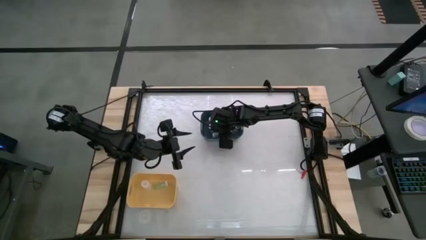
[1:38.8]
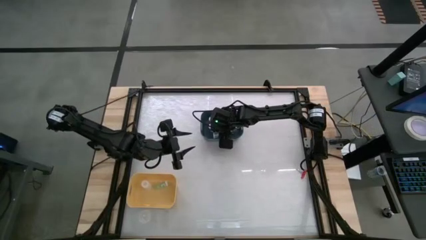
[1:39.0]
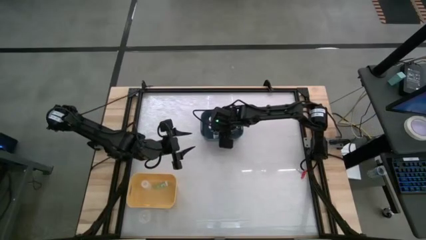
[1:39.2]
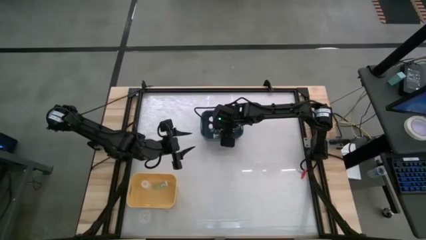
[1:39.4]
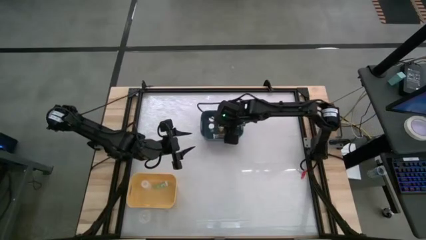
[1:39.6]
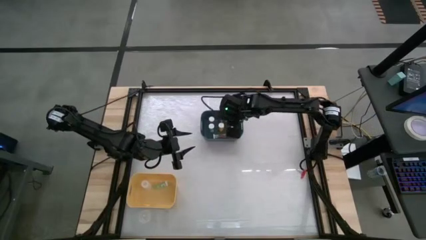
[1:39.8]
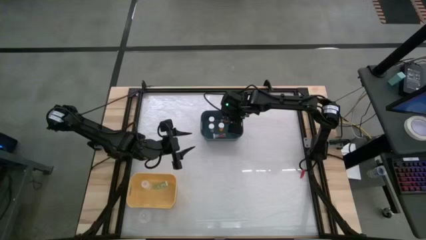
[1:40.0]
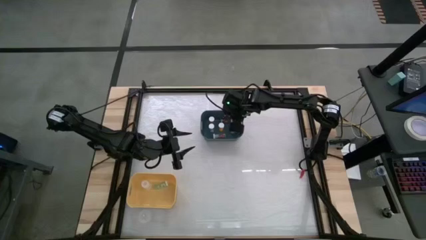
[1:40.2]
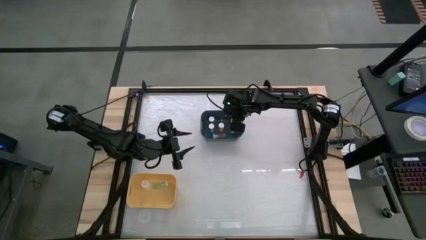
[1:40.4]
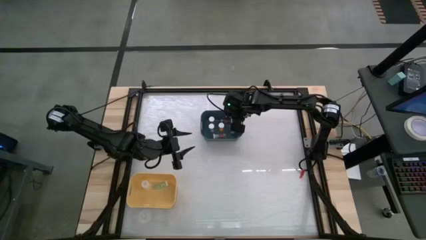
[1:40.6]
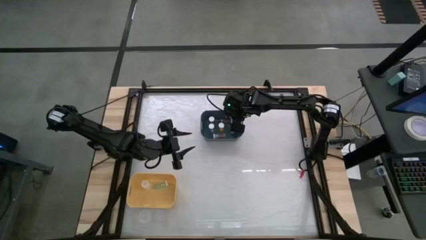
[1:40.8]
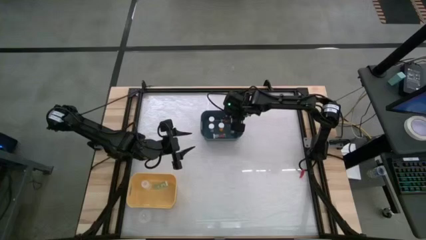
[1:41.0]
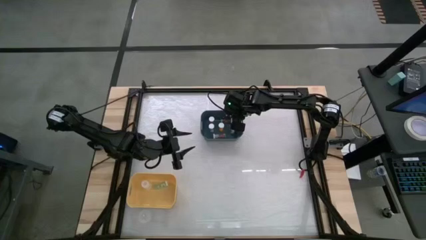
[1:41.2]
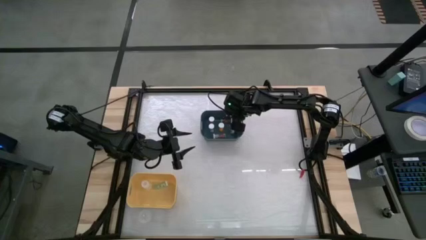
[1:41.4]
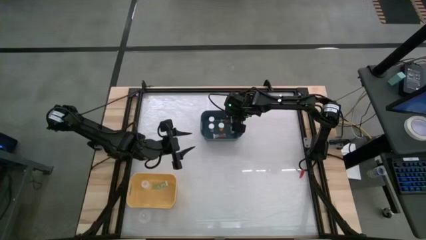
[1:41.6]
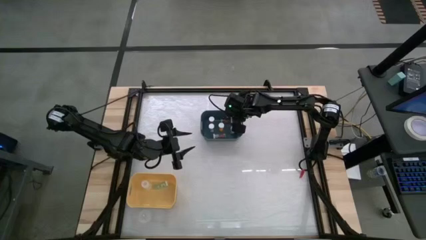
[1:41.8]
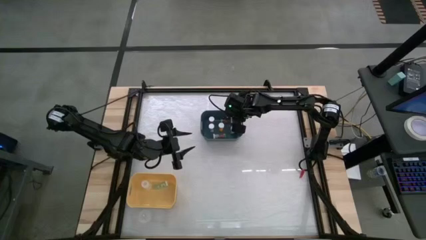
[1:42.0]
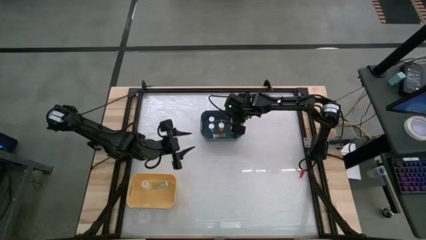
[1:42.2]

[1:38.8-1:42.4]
Task: Pick and place medicine bottles into bin by pill shape (circle, oval)
Adjust the blue capsule bottle in the blue bin

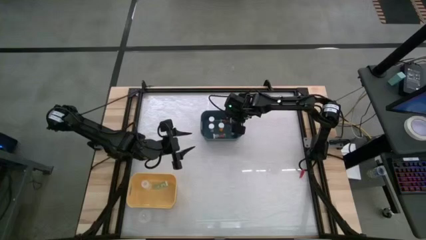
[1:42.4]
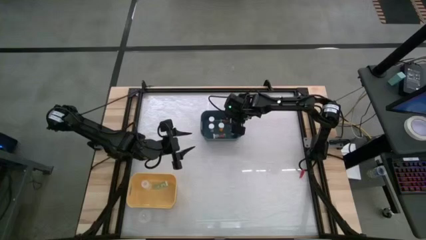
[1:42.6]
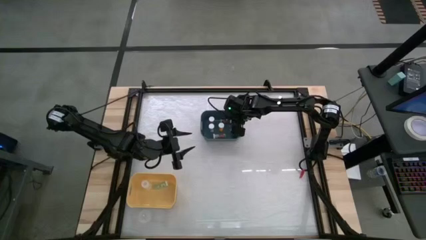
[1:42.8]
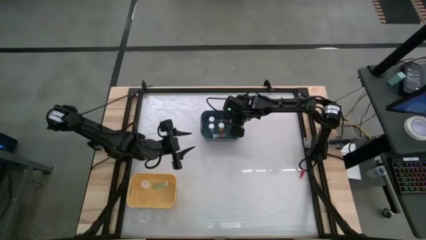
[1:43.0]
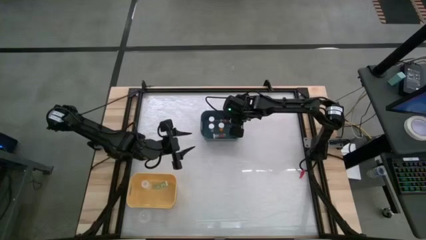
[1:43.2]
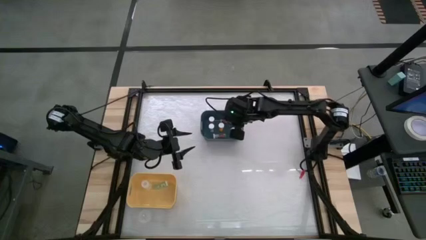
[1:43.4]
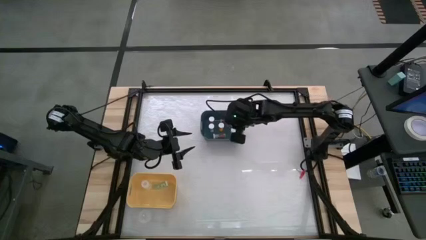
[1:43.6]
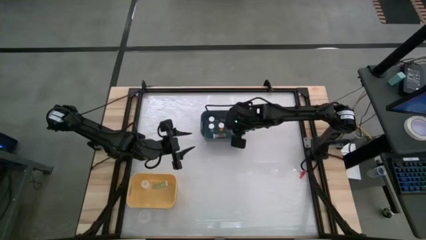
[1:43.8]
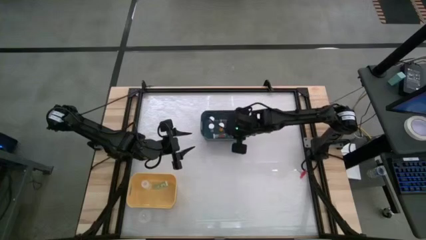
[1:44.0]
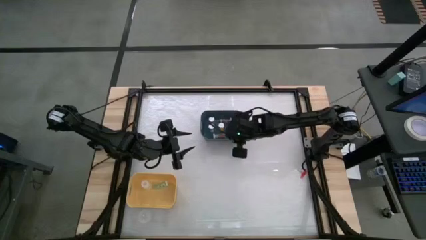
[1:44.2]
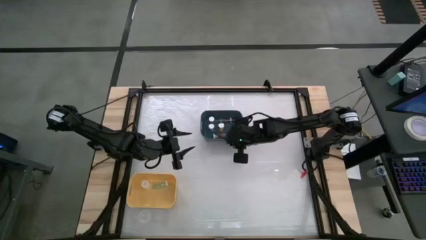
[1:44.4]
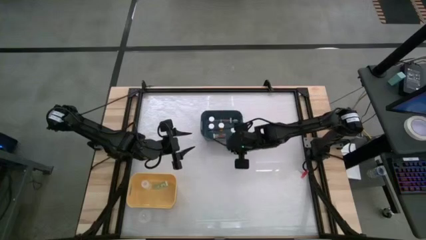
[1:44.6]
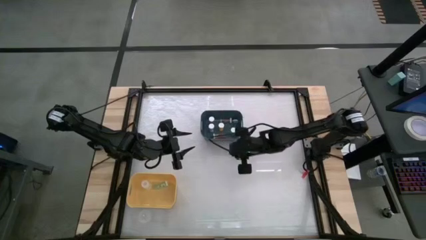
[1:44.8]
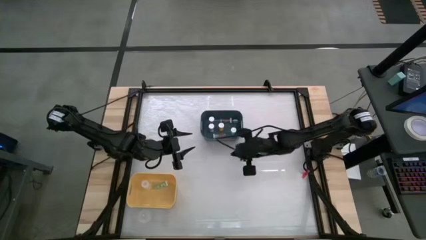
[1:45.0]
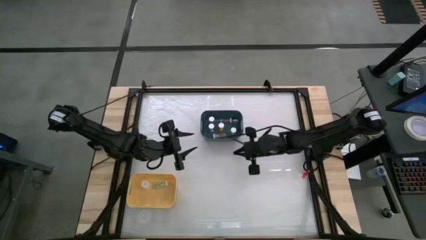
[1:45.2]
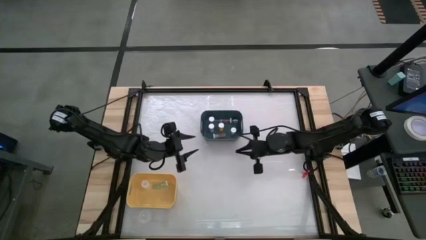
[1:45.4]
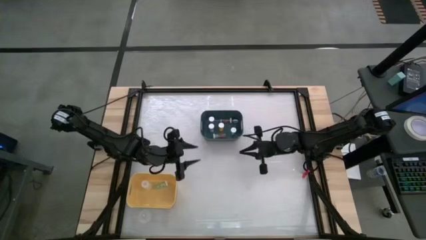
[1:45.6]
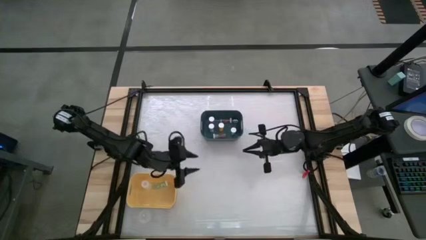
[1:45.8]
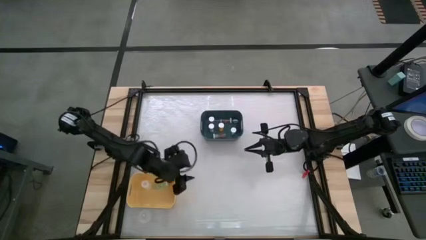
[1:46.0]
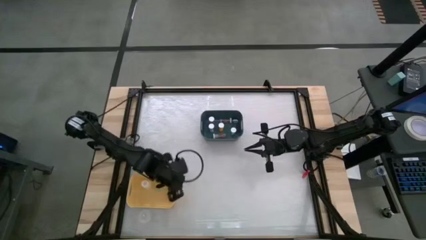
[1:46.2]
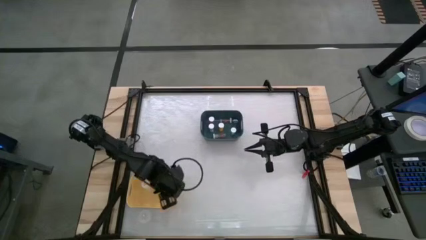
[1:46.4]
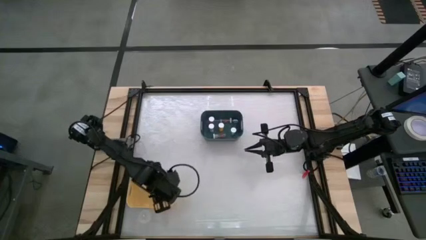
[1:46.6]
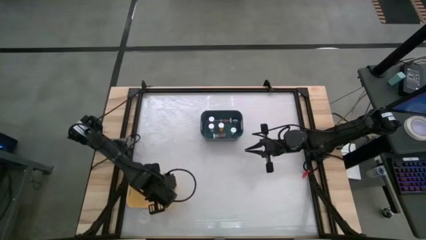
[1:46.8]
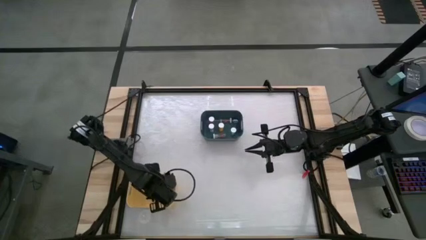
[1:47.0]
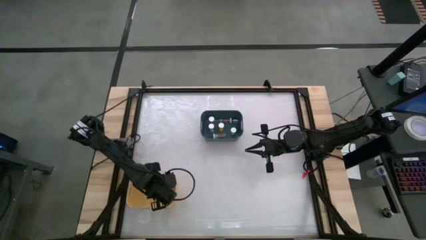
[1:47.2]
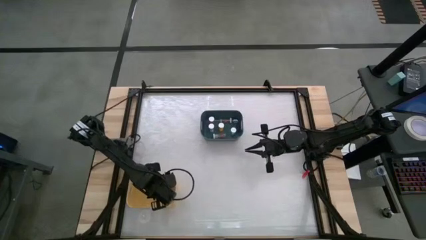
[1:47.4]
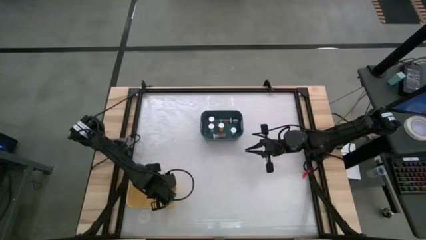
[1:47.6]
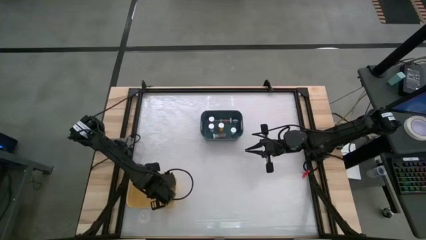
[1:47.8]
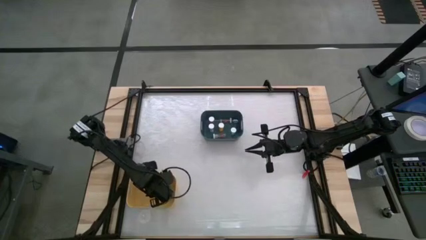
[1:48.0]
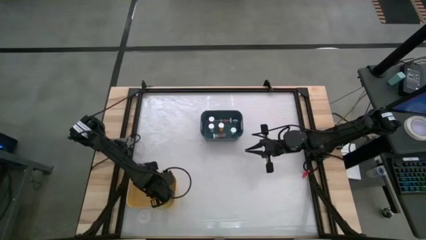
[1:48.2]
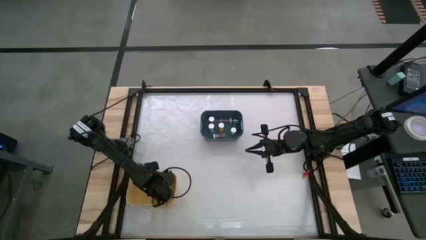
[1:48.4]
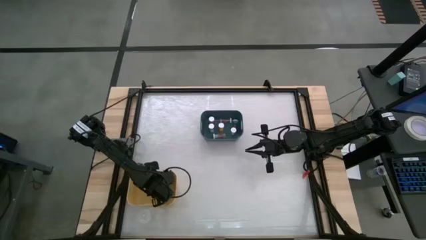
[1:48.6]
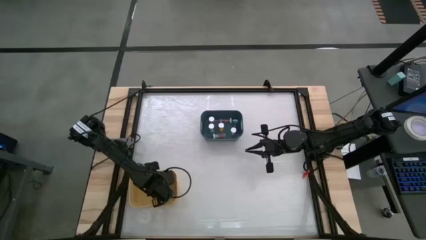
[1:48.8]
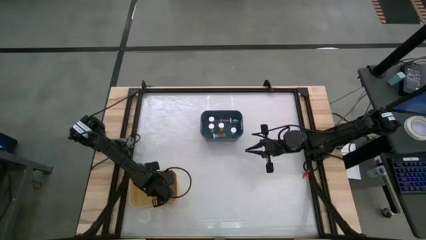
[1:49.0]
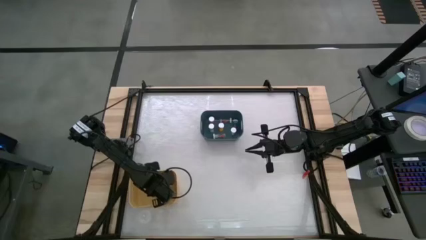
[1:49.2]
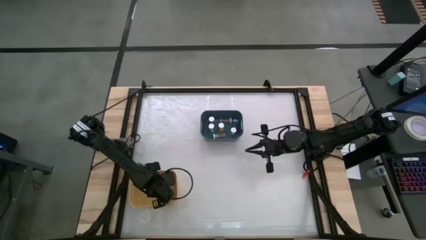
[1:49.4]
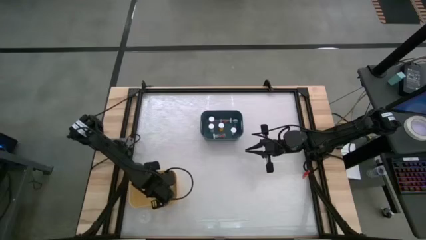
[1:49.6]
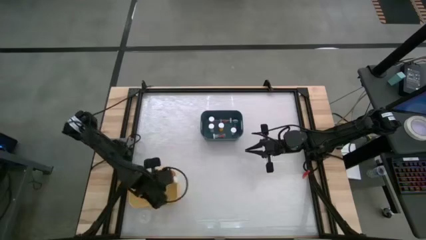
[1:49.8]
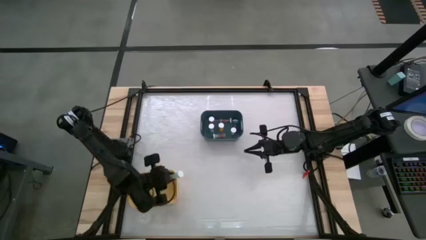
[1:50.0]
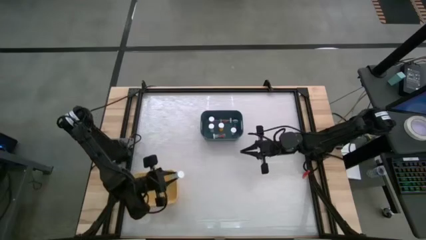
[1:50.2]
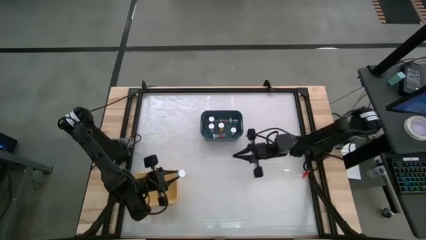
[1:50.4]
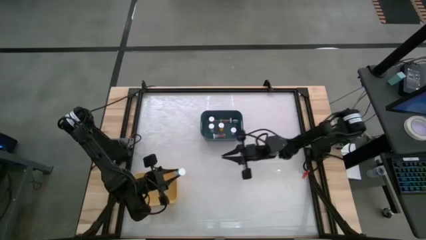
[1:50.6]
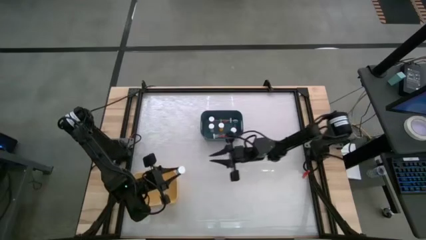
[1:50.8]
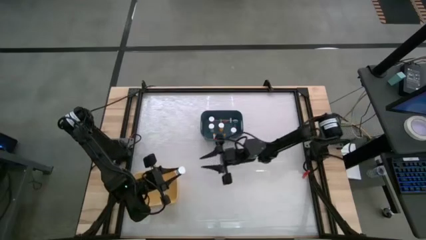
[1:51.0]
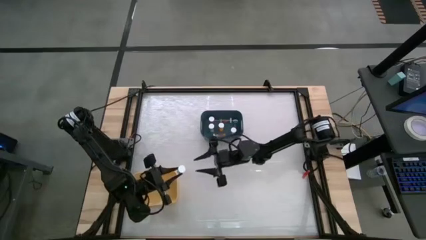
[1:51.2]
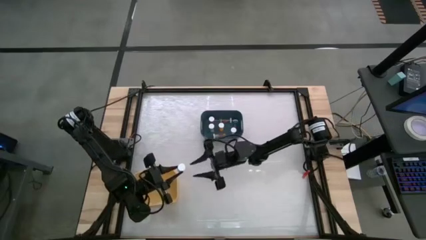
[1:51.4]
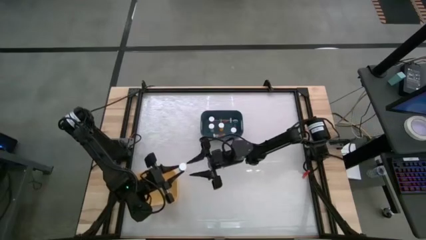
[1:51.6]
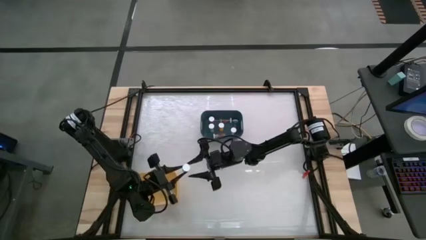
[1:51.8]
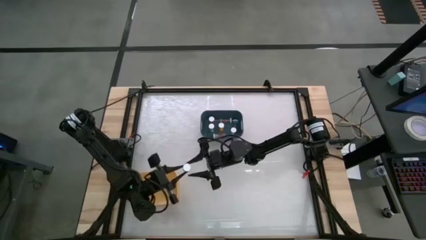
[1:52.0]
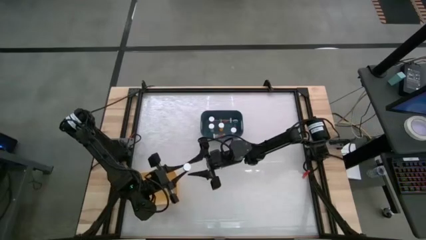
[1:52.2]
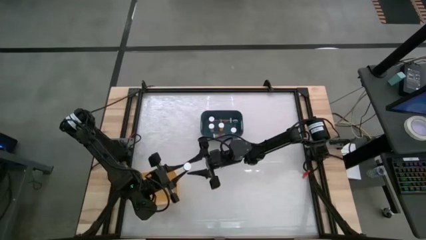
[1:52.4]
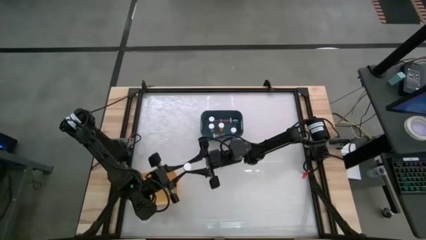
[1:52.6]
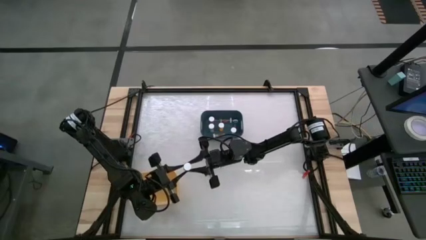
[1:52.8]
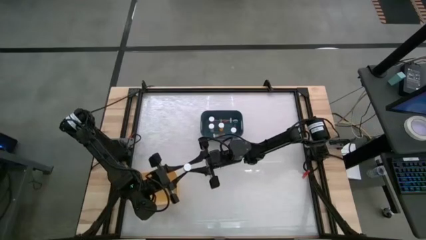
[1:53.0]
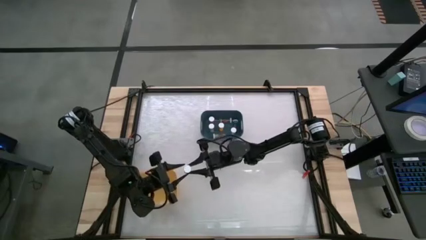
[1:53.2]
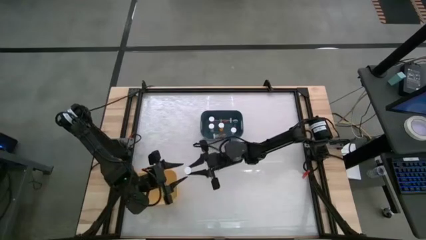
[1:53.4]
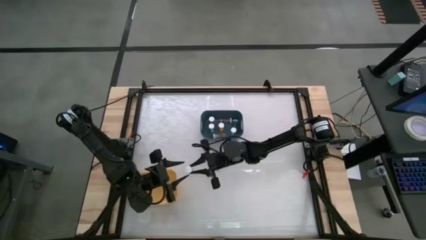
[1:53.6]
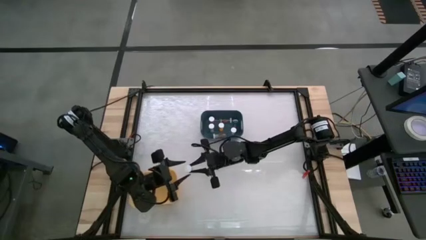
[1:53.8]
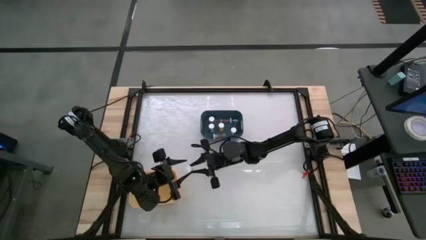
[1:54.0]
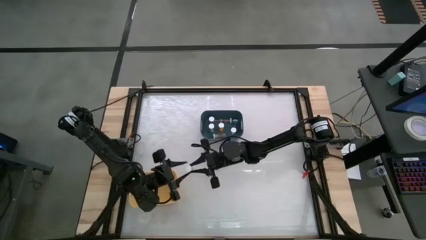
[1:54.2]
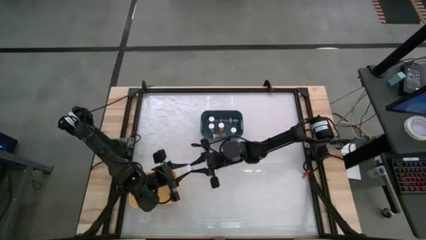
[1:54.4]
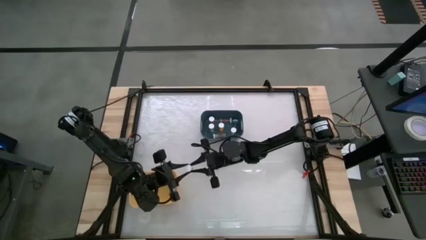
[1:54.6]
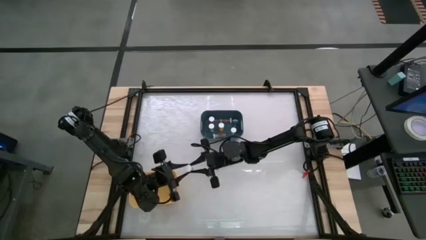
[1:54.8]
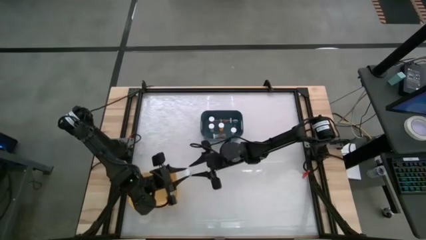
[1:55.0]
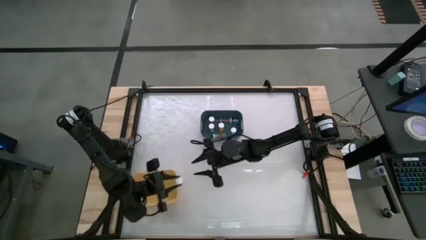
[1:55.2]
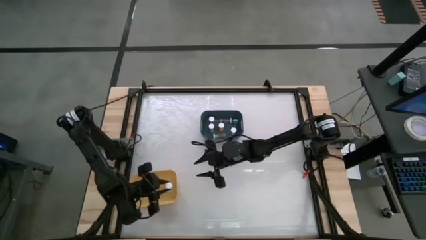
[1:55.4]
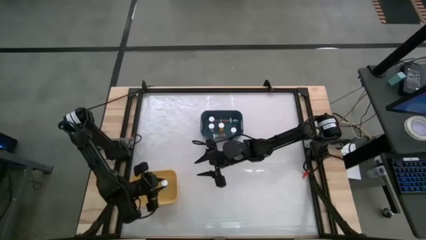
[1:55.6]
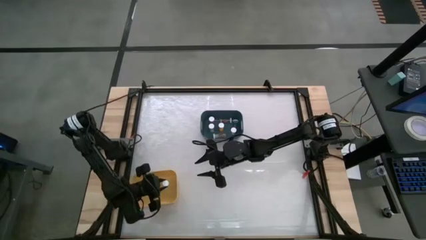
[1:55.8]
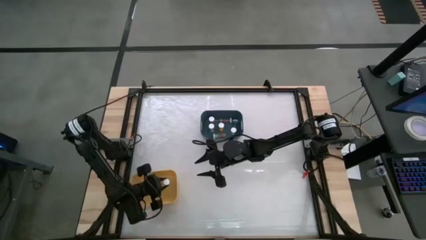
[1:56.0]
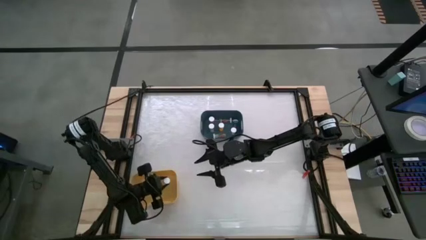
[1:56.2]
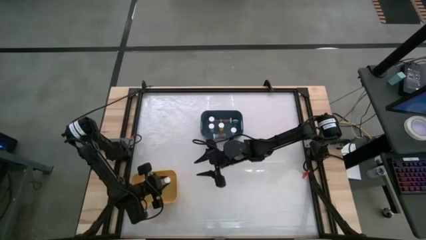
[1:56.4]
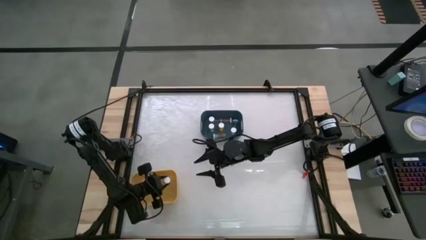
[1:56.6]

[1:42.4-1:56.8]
Adjust the green tablet bottle in the yellow bin
